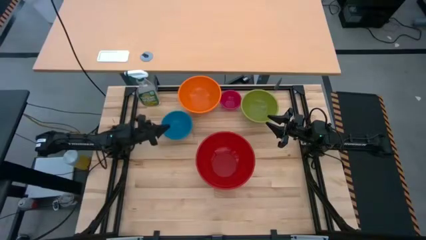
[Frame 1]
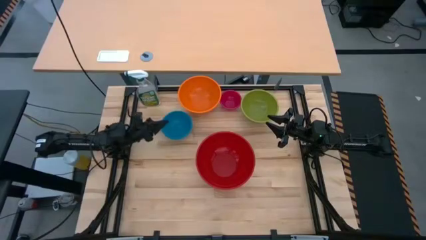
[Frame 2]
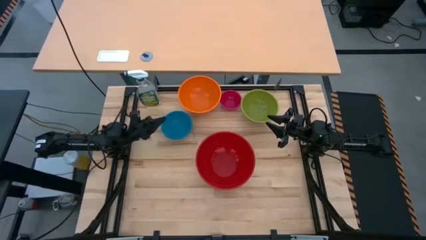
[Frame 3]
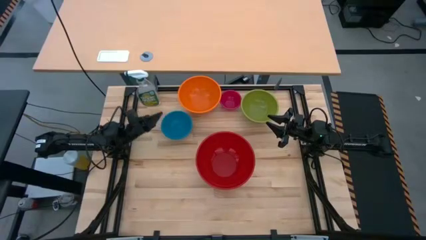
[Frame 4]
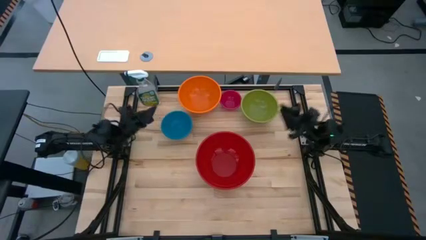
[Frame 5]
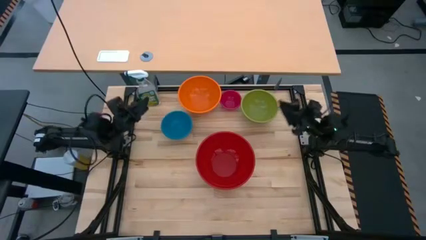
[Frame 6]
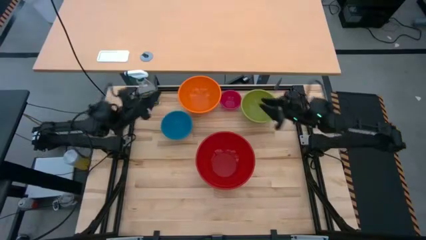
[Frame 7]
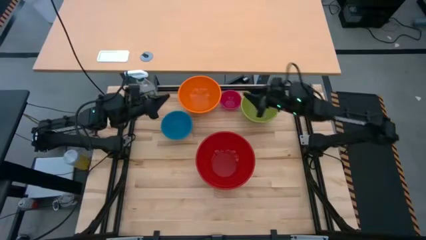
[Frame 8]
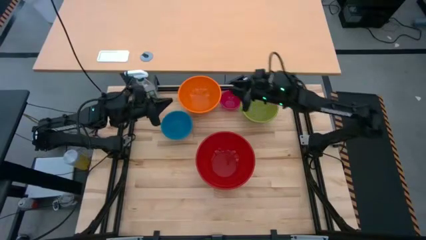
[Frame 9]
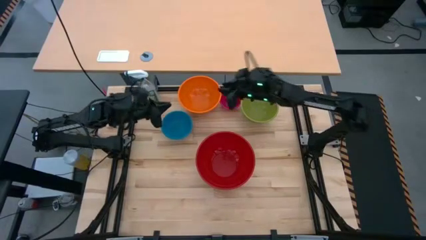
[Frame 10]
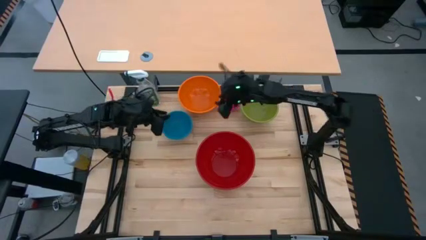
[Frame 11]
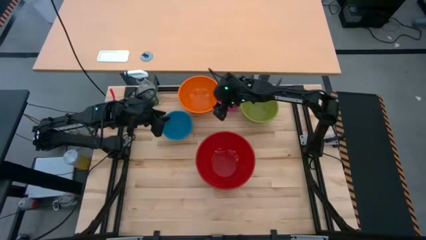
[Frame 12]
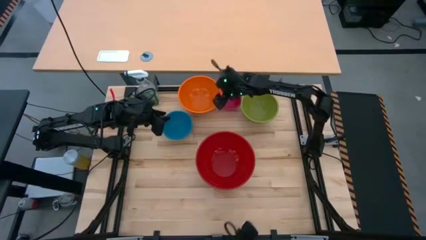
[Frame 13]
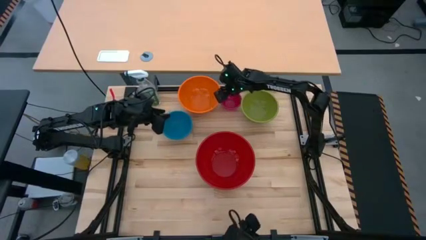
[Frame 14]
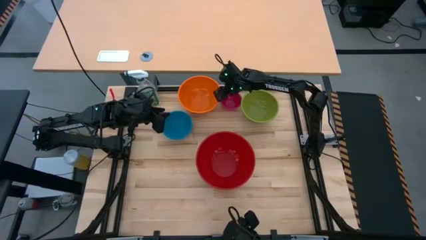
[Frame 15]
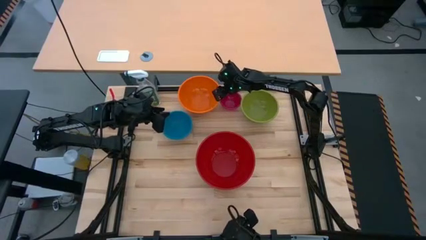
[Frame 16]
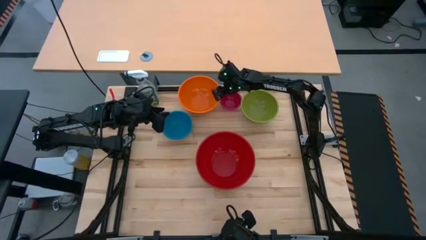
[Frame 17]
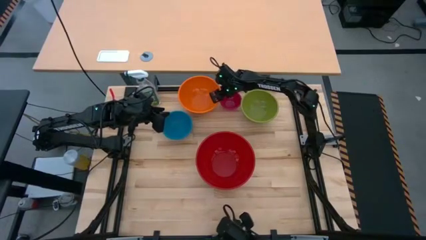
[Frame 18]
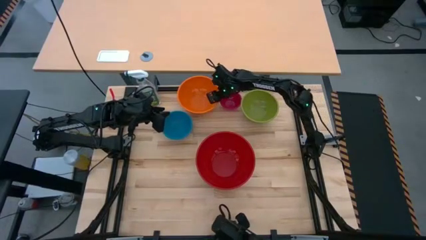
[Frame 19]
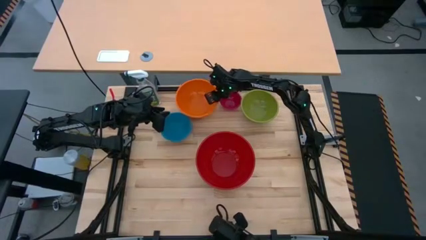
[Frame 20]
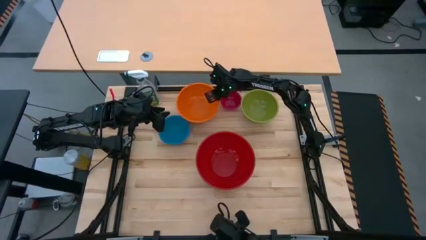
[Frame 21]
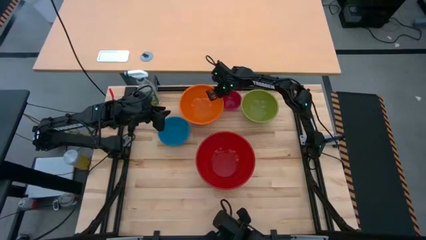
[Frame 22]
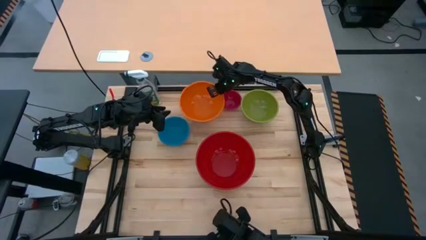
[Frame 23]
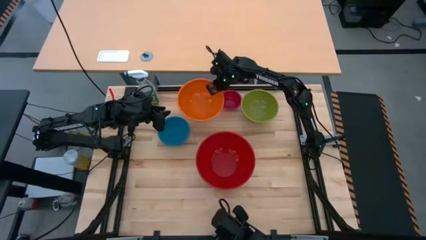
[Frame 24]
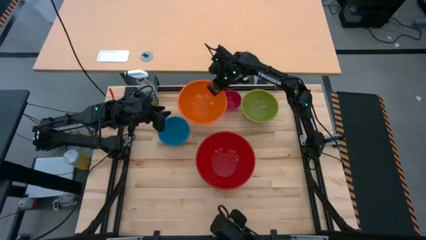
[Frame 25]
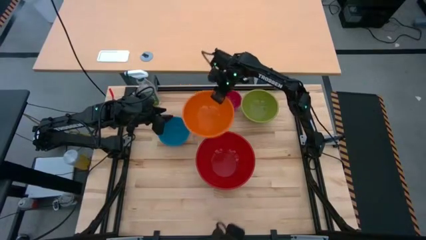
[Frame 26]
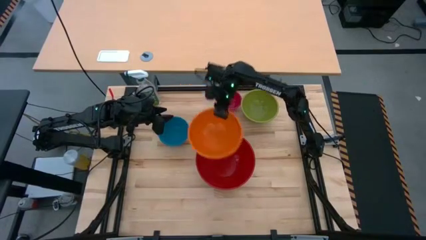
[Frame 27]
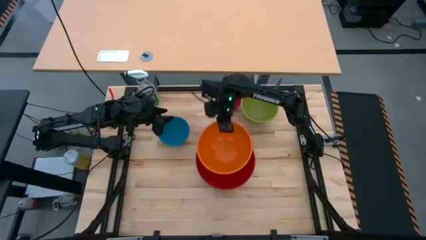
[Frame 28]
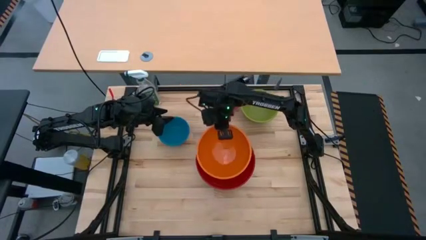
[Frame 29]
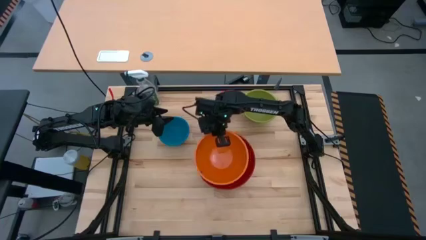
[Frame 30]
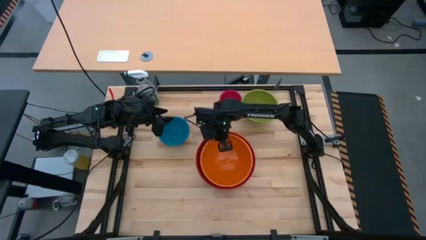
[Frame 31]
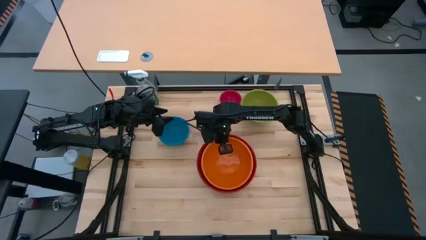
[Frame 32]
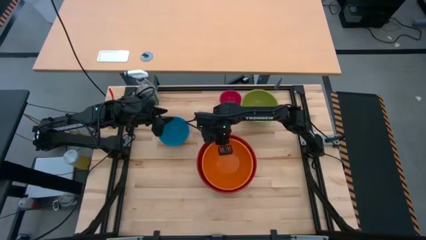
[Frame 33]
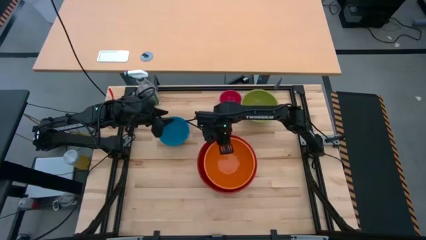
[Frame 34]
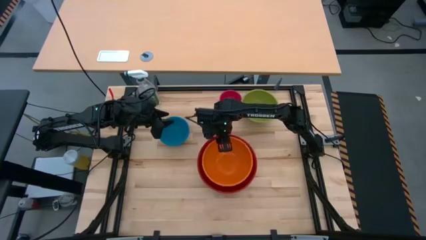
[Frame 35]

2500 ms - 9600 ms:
Stack the orange bowl on top of the red bowl

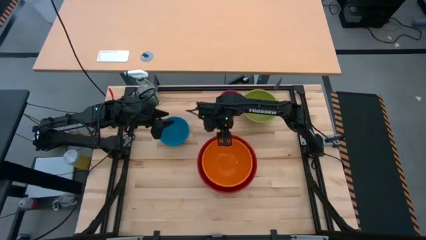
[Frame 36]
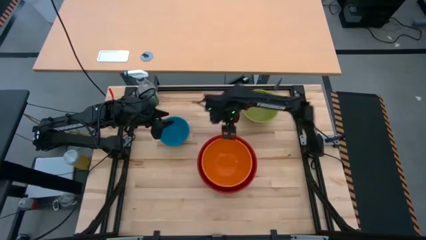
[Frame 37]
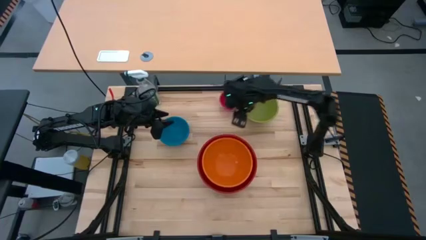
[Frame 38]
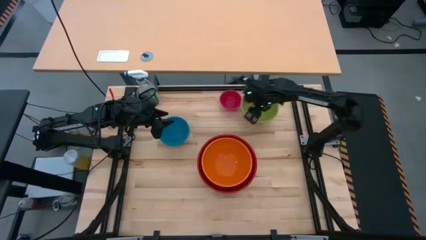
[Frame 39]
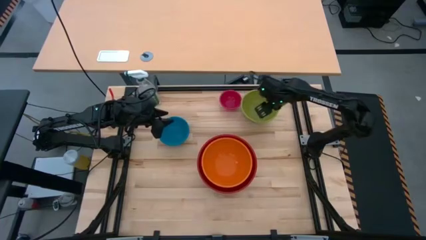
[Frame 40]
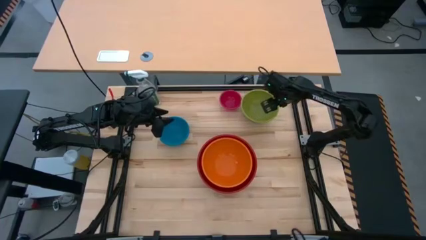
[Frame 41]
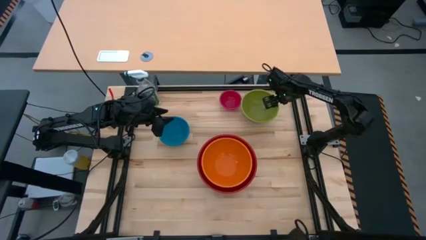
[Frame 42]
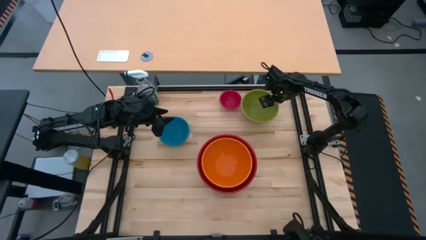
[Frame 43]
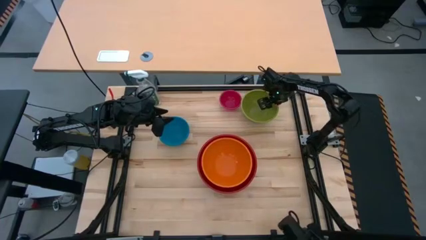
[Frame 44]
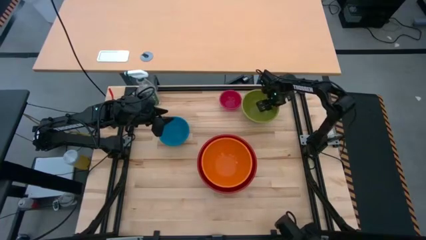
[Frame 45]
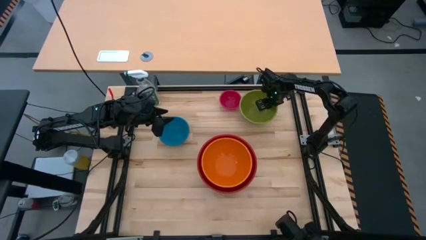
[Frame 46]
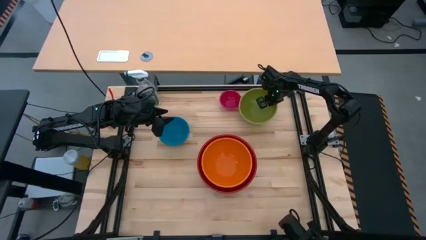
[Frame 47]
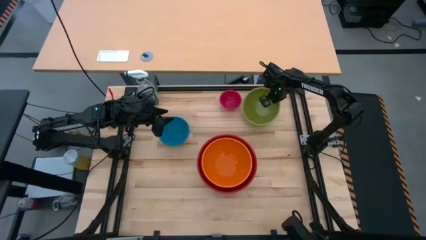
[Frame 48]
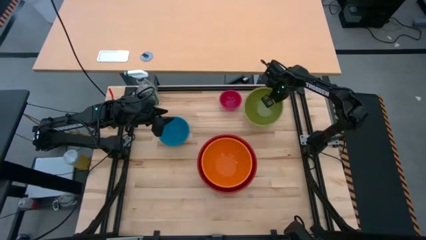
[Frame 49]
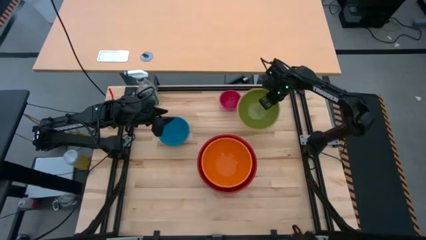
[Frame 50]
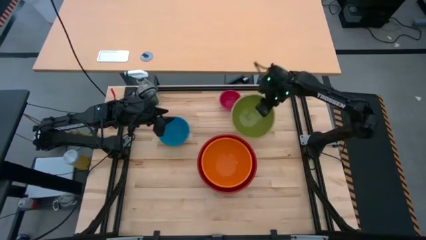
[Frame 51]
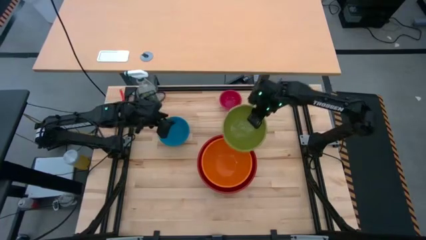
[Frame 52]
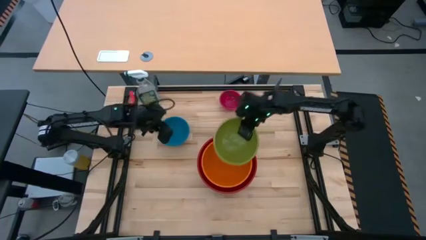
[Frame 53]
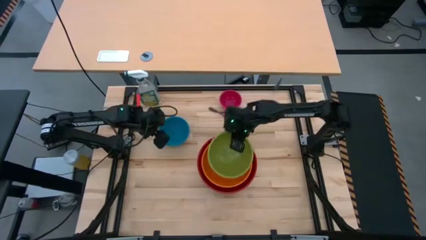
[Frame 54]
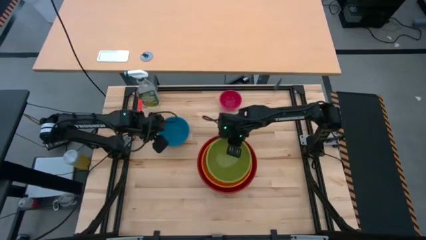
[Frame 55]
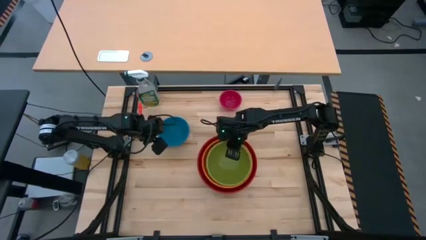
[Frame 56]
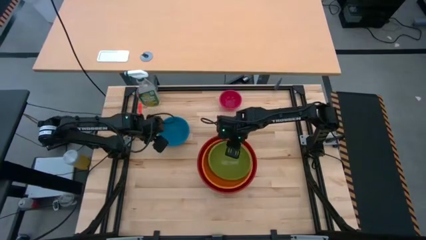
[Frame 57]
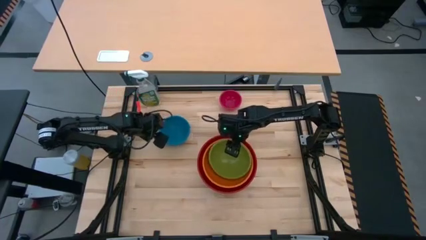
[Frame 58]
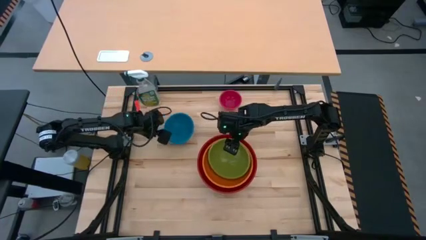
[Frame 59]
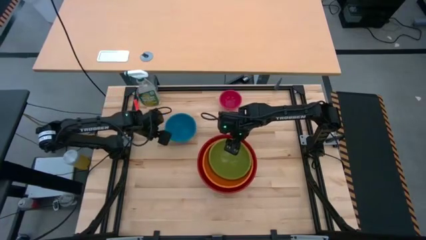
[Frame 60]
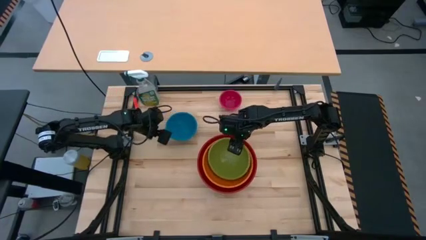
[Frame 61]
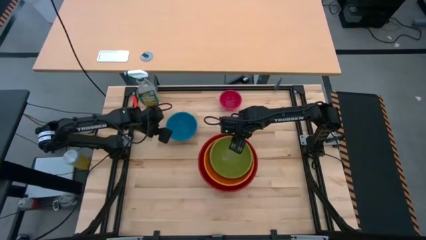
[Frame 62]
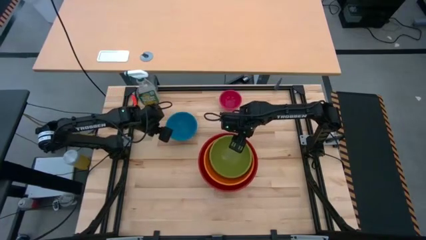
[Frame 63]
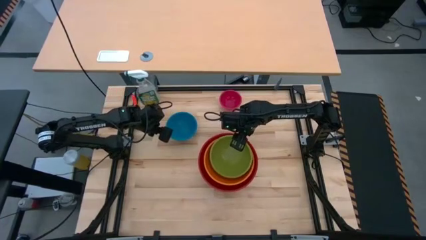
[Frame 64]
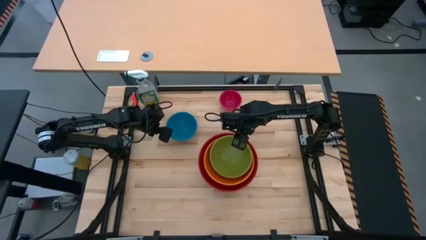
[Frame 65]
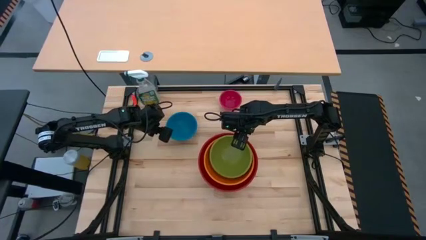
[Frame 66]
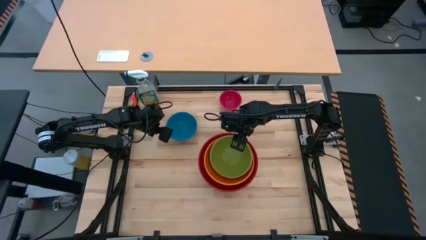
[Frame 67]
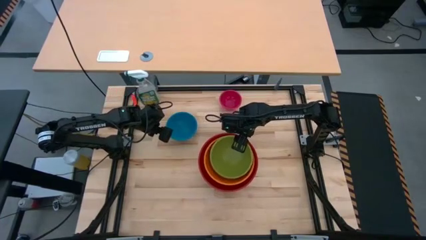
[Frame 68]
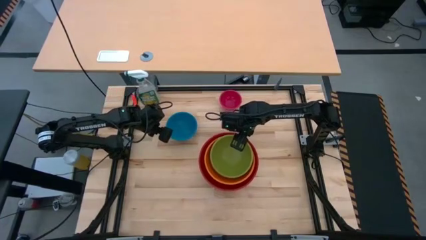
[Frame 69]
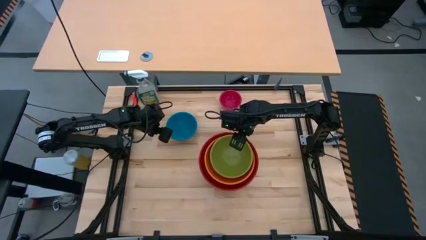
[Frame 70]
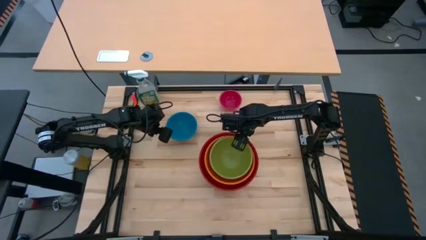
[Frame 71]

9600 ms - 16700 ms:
Stack the green bowl on top of the orange bowl

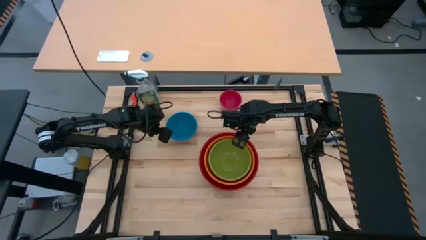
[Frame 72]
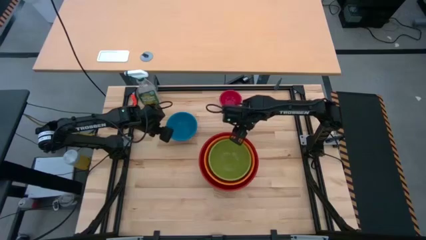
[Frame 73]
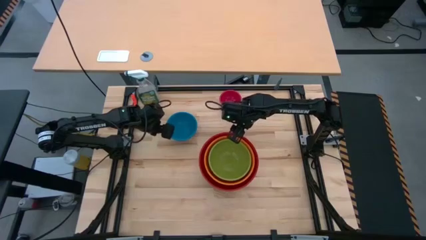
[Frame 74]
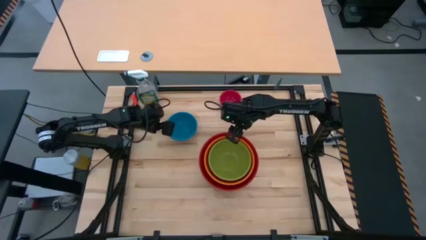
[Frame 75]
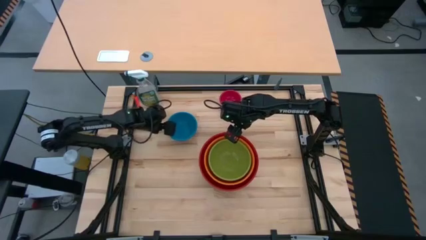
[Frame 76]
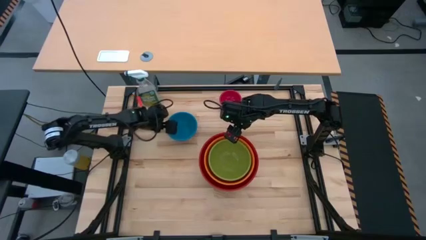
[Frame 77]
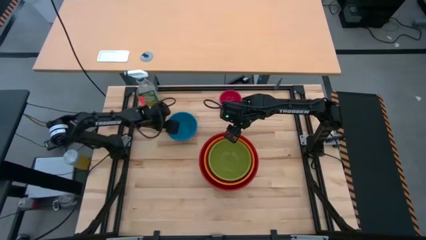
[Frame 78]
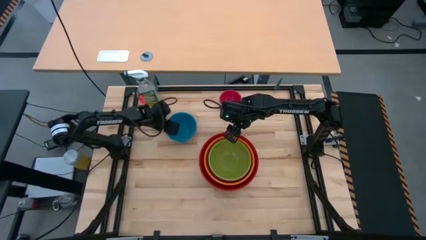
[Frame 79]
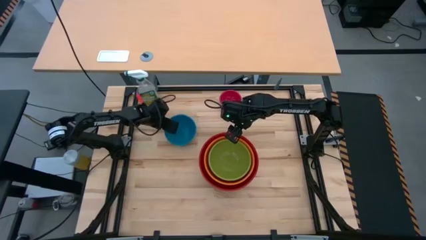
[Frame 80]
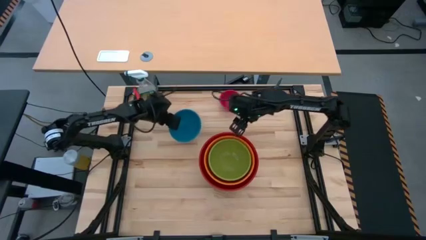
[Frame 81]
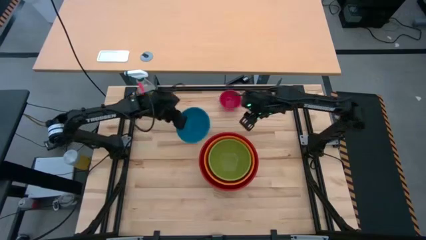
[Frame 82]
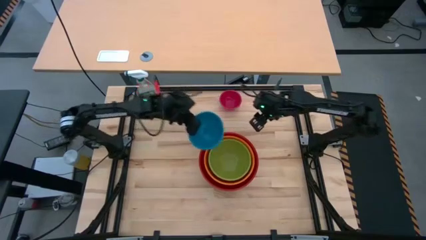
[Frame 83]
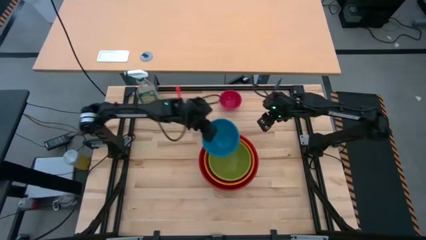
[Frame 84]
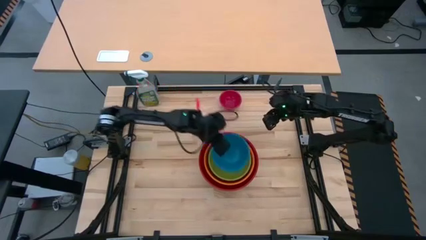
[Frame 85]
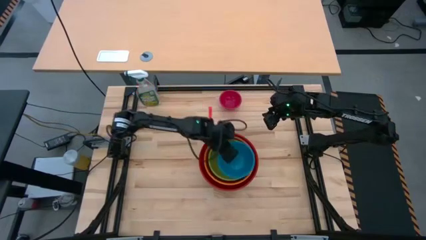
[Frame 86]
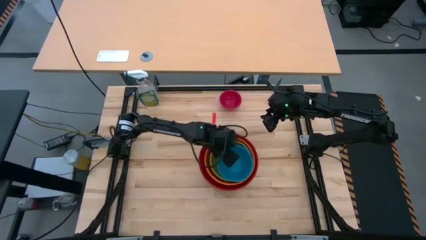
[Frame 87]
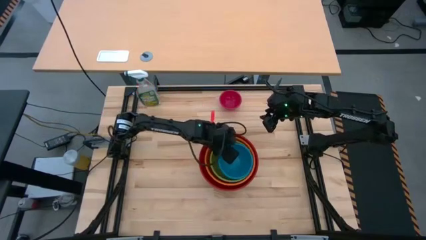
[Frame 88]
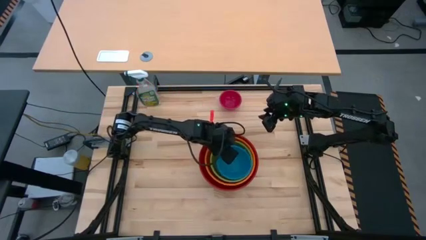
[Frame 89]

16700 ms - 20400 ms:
Stack the blue bowl on top of the green bowl
